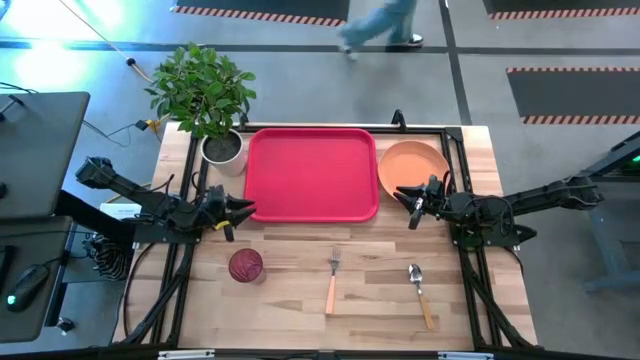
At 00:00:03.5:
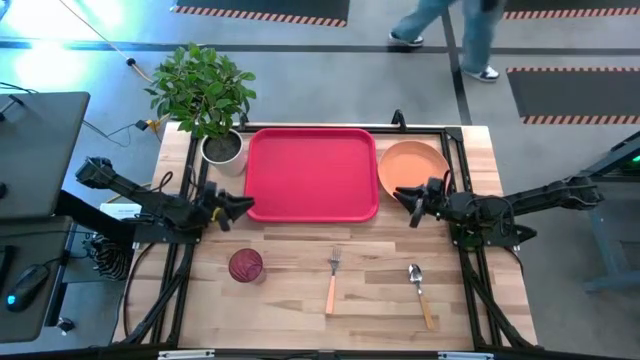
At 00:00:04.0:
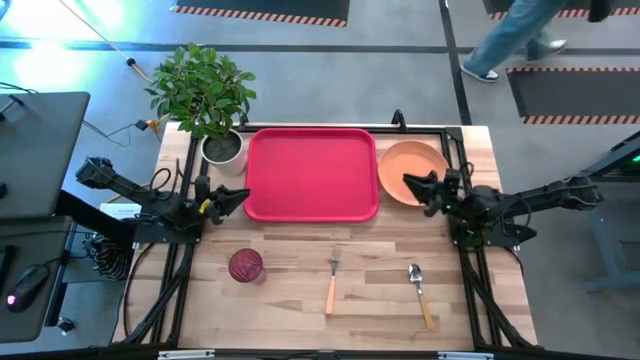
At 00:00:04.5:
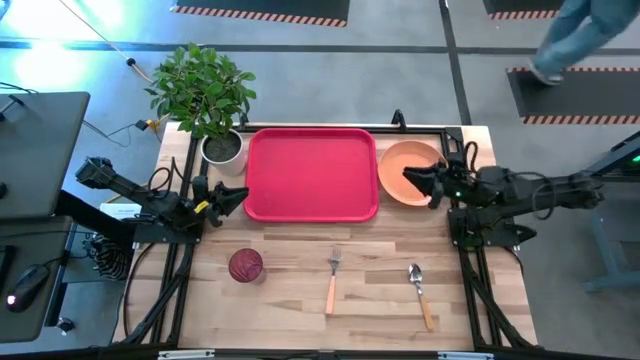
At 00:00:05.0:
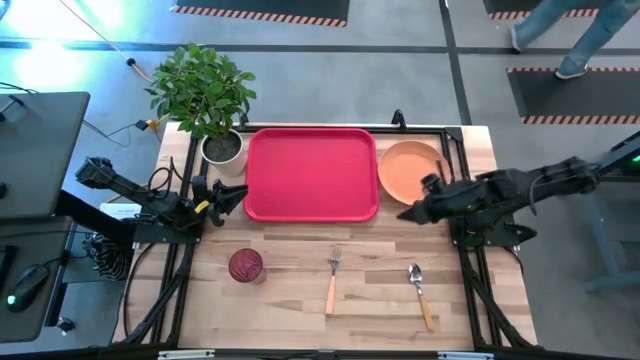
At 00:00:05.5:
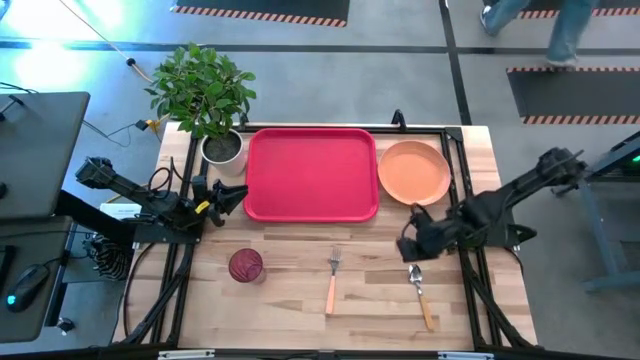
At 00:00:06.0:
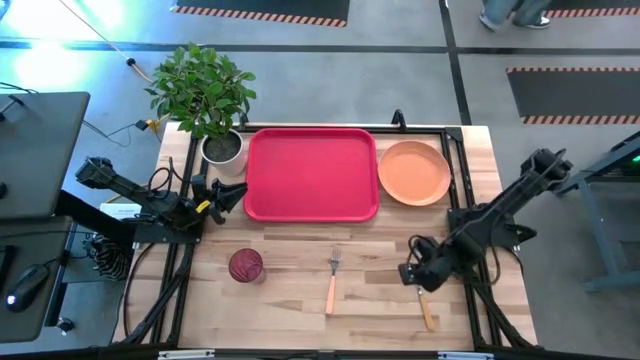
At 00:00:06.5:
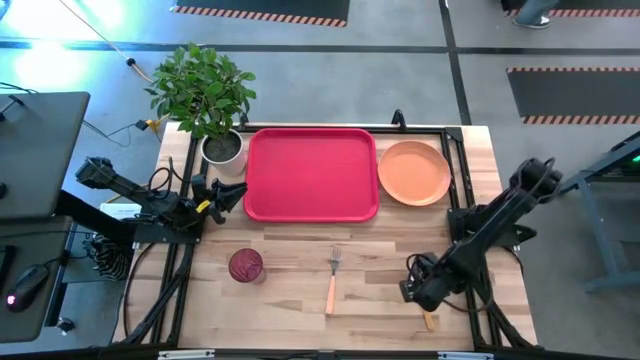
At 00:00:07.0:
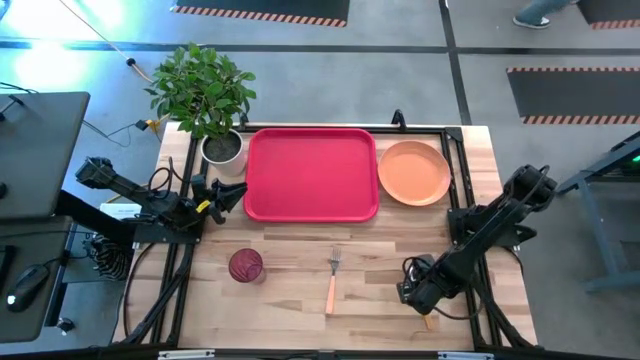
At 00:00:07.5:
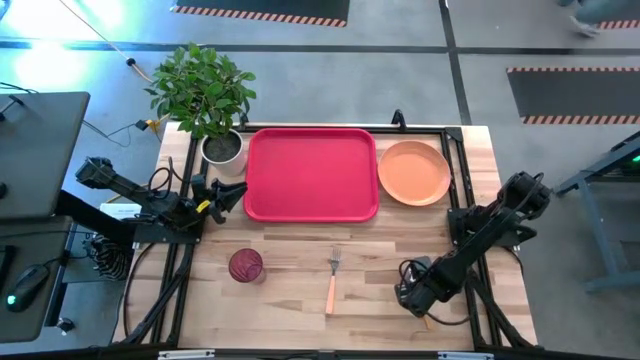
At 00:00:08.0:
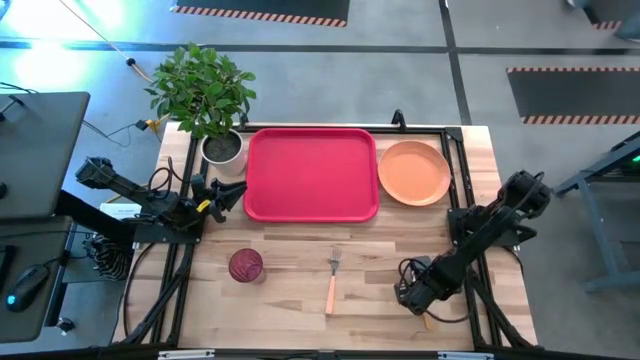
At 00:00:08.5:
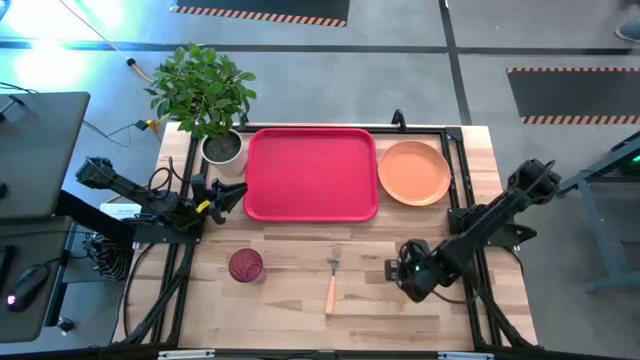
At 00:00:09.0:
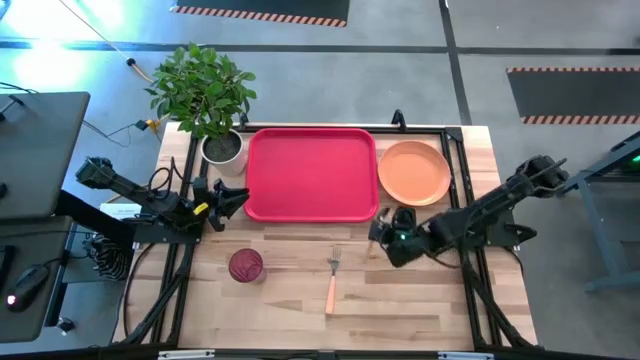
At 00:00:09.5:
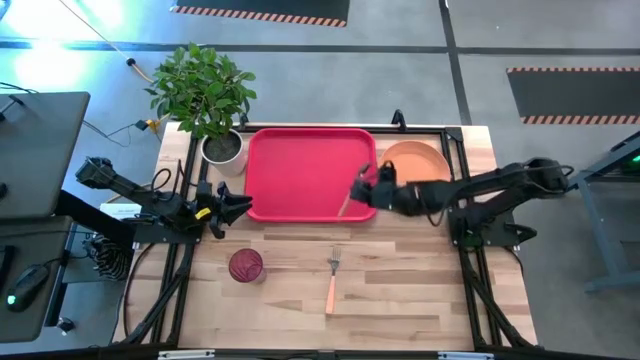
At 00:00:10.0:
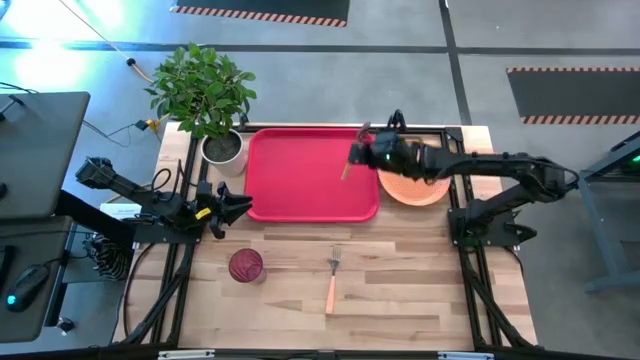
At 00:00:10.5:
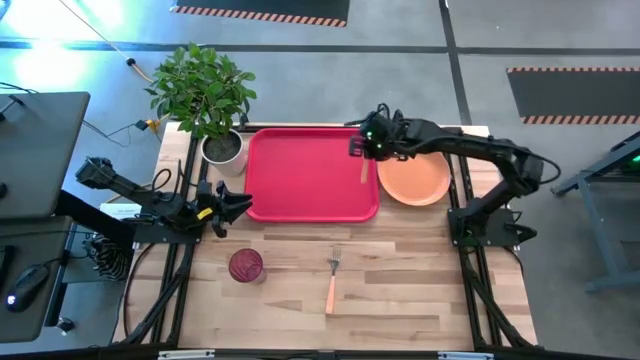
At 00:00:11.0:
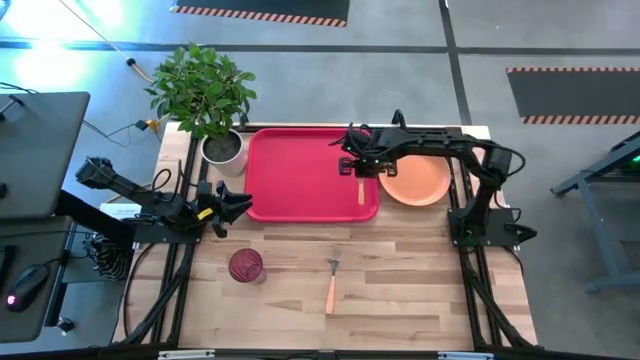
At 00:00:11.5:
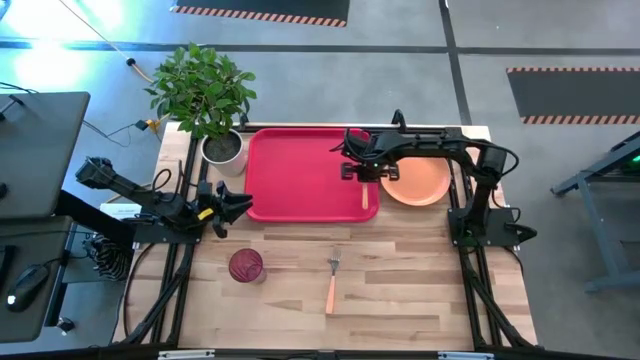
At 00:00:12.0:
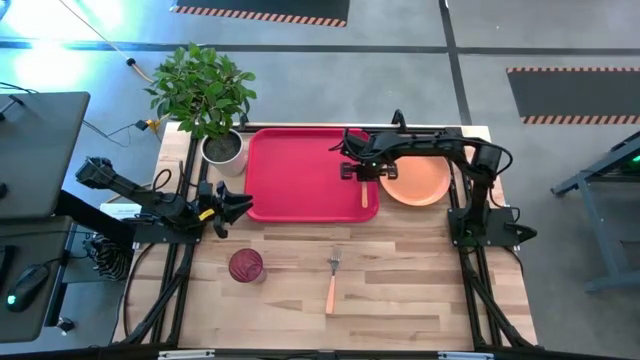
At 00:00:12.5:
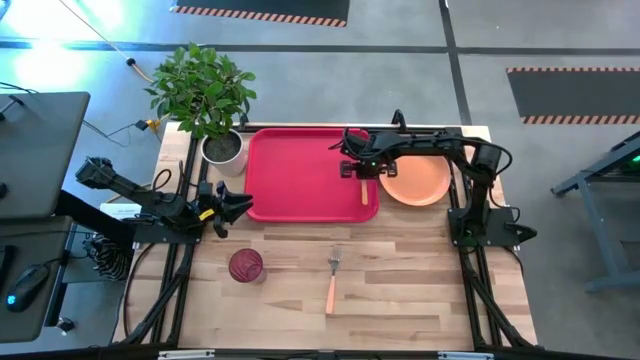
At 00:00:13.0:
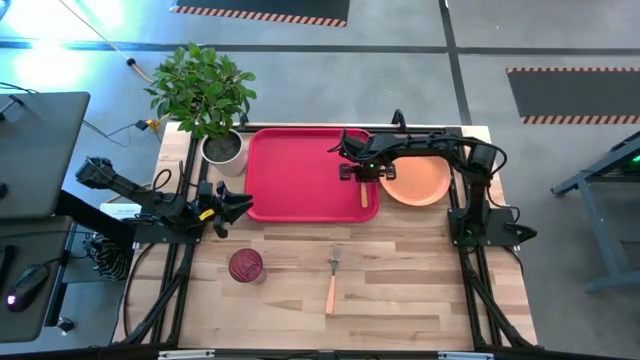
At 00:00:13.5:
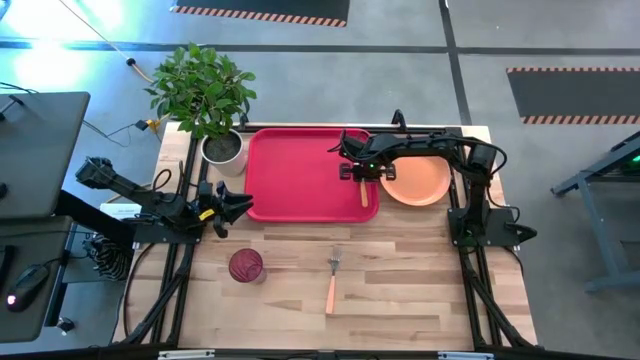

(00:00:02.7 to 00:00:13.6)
Task: Pick and place plate/cup/fork/spoon on tray
Put the yellow spoon on the red tray

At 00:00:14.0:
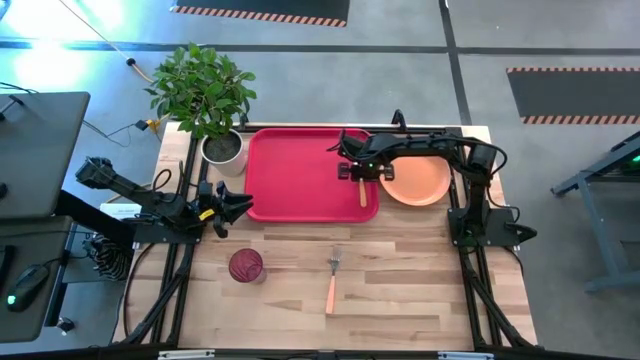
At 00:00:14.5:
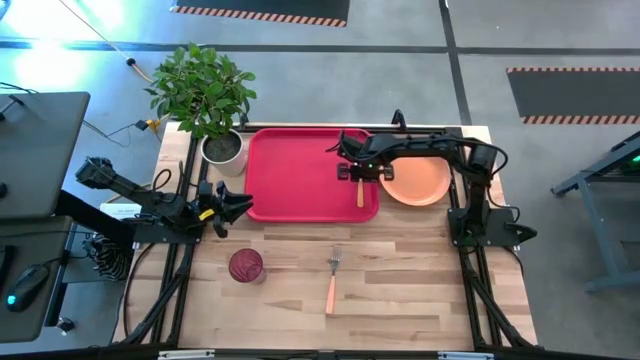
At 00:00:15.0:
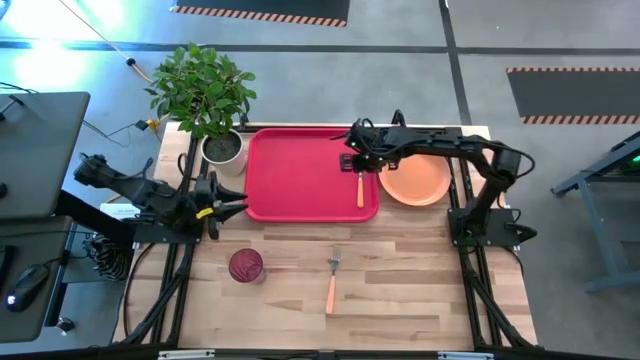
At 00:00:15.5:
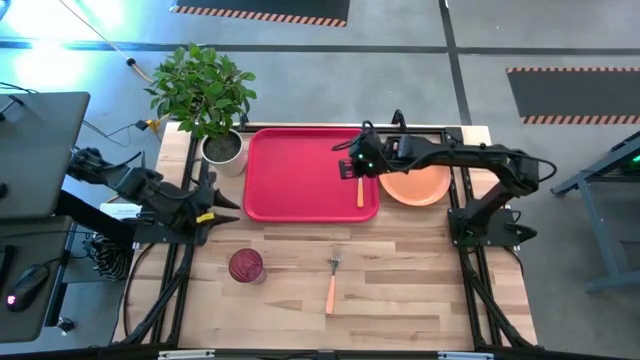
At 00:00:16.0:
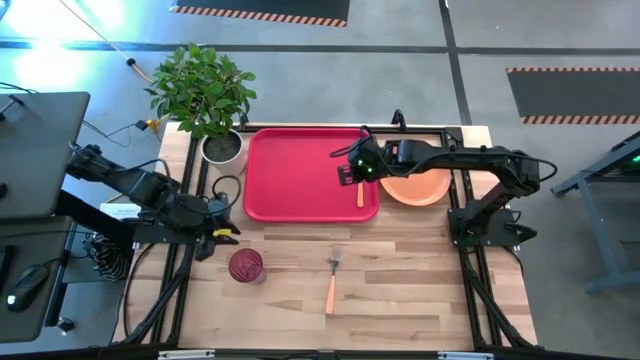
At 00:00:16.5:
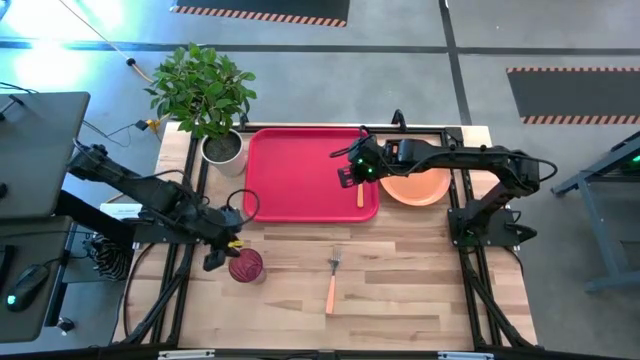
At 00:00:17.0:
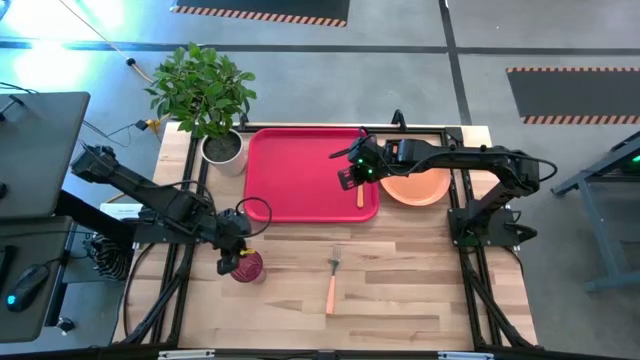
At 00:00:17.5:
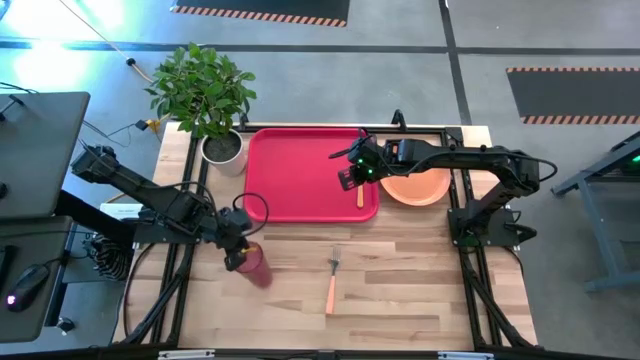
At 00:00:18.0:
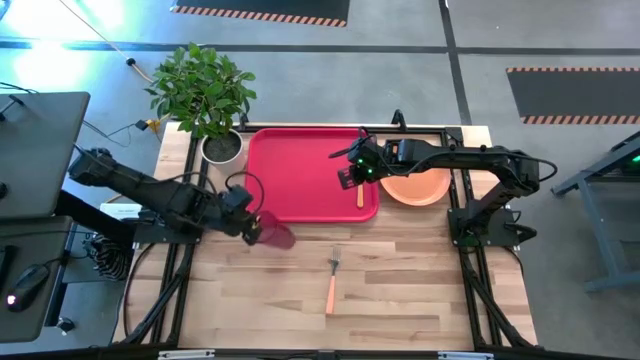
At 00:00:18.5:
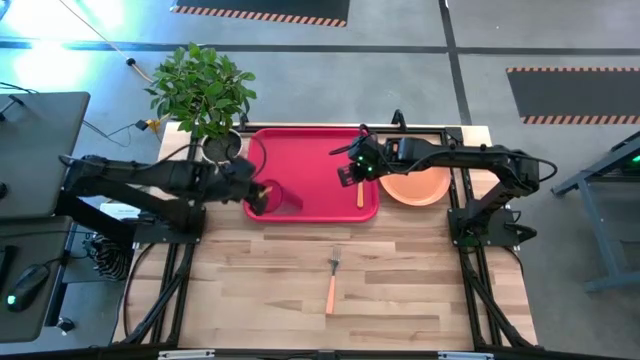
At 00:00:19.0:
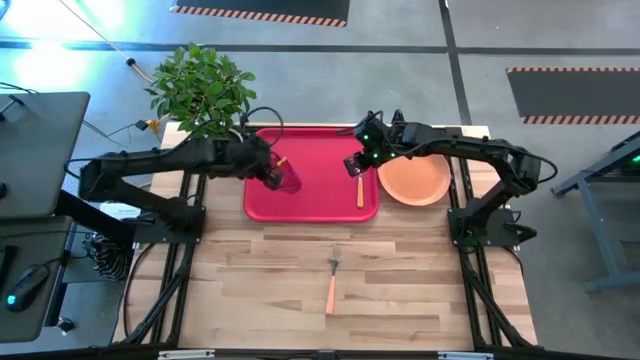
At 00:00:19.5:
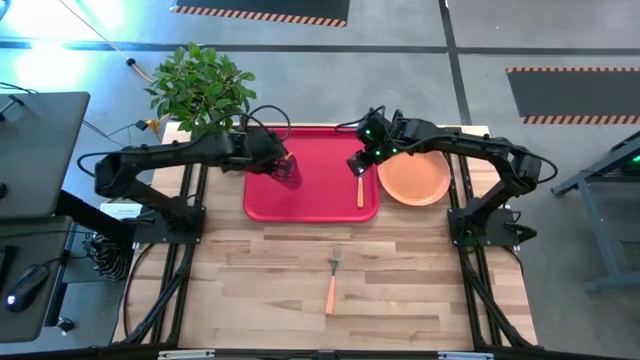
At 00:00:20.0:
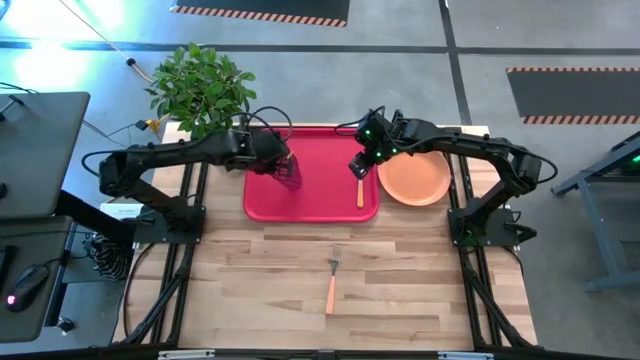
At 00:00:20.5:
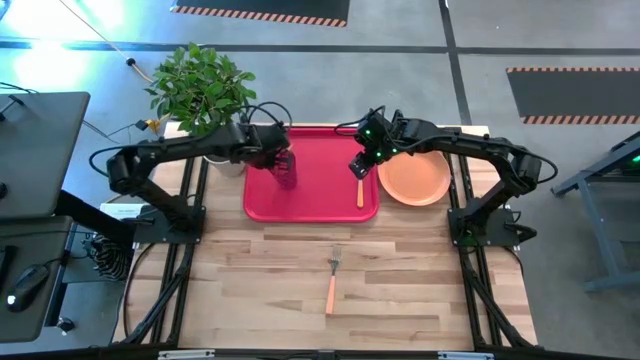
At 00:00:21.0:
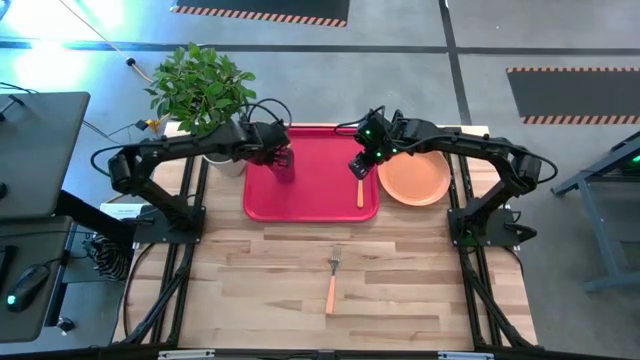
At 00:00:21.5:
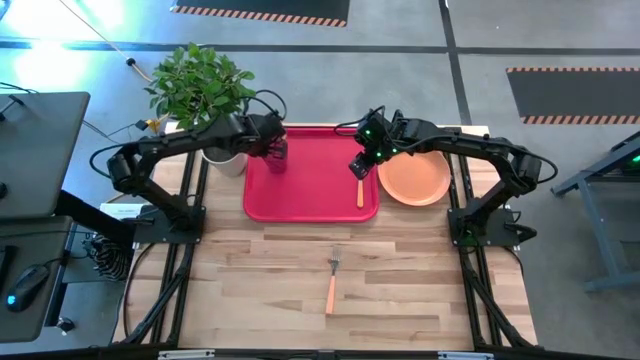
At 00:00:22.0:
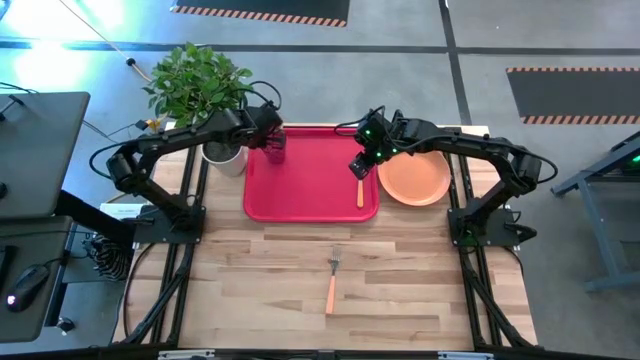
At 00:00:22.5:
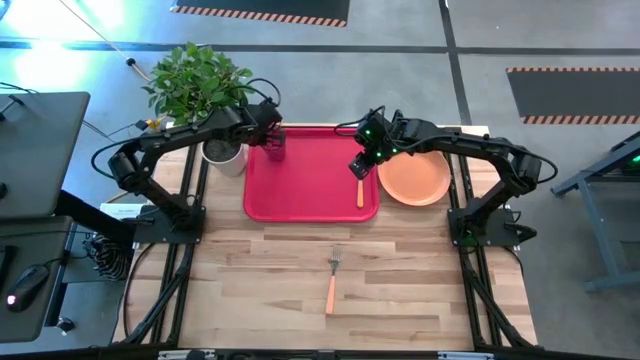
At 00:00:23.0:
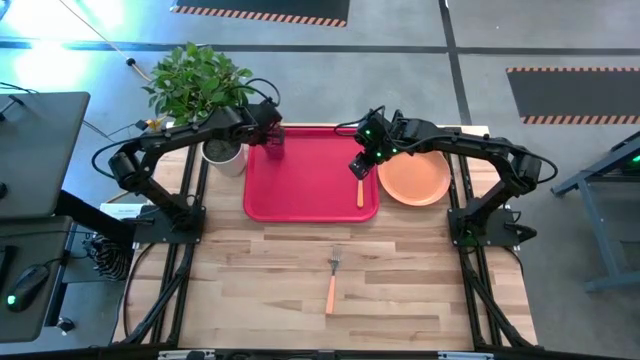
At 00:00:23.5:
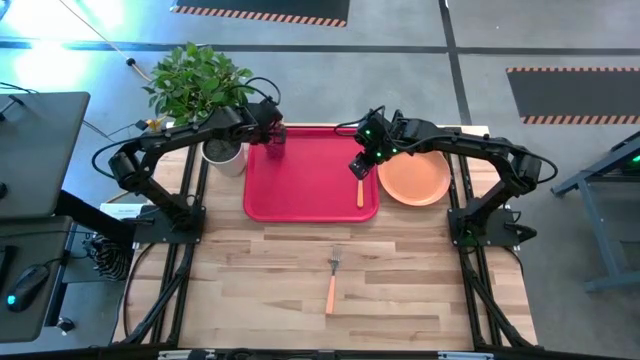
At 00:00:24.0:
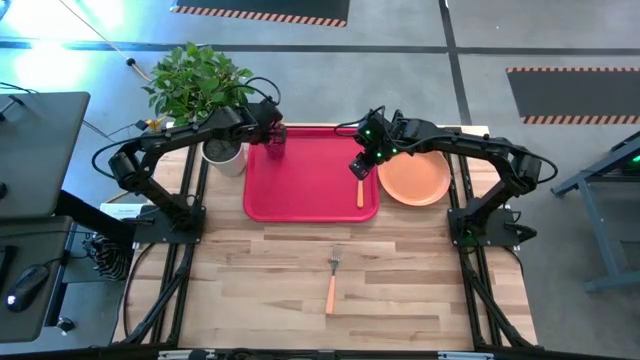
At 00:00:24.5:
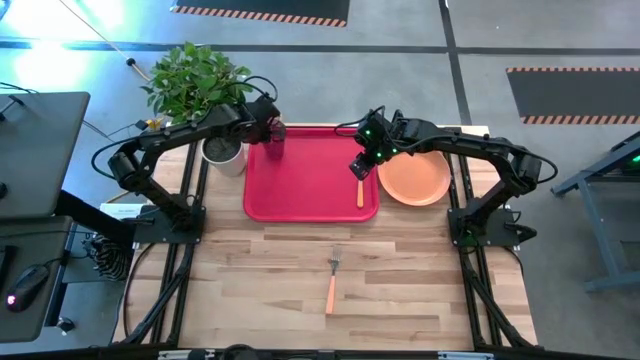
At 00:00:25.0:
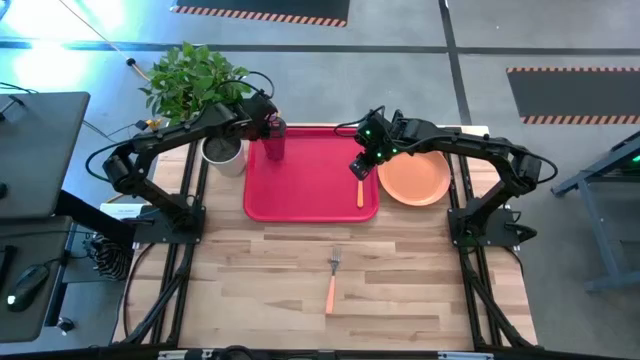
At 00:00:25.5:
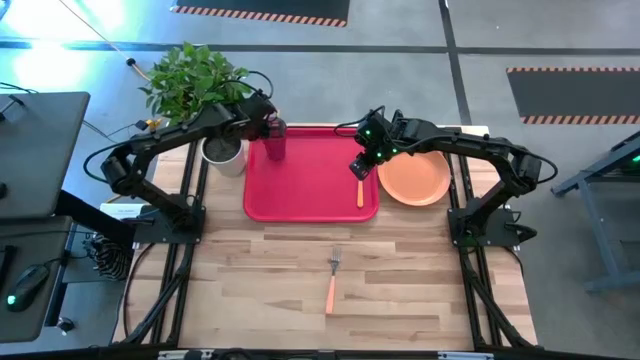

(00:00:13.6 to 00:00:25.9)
Put the violet cup on the top left of the red tray
